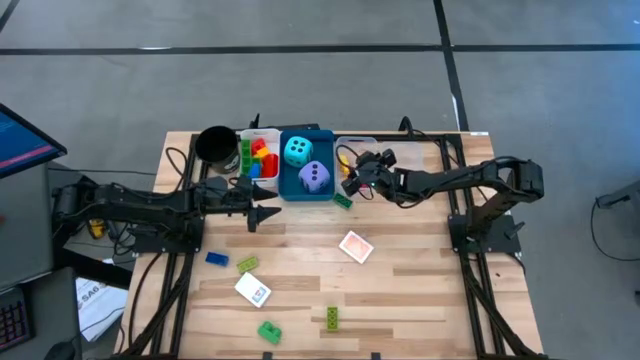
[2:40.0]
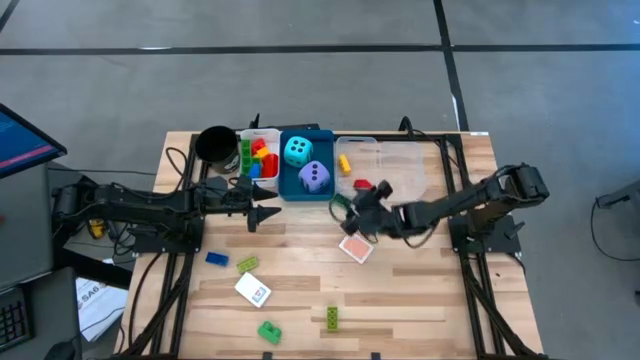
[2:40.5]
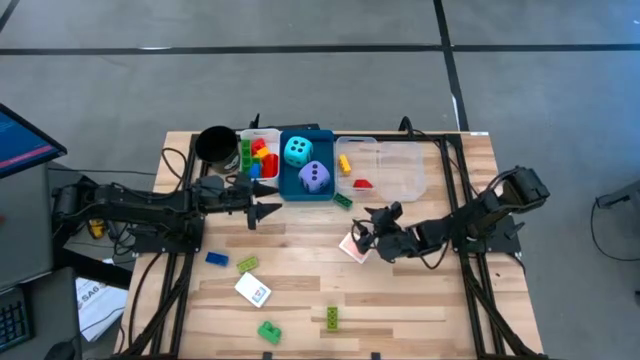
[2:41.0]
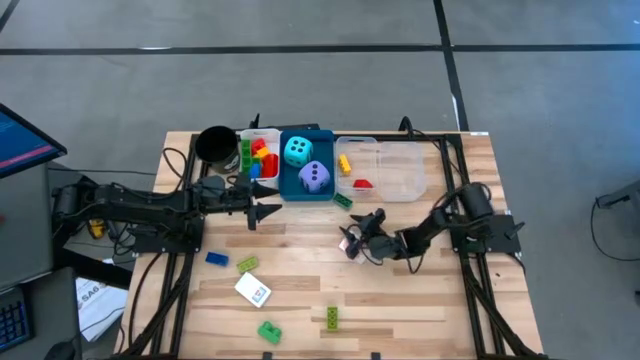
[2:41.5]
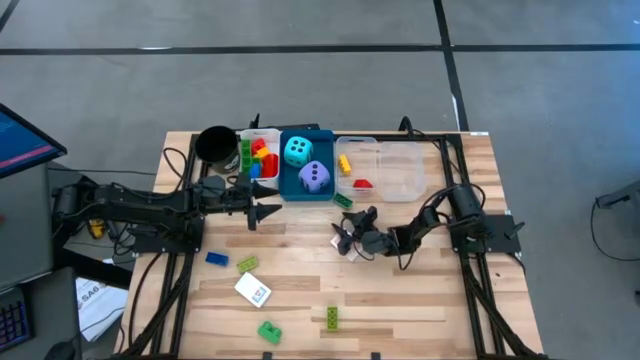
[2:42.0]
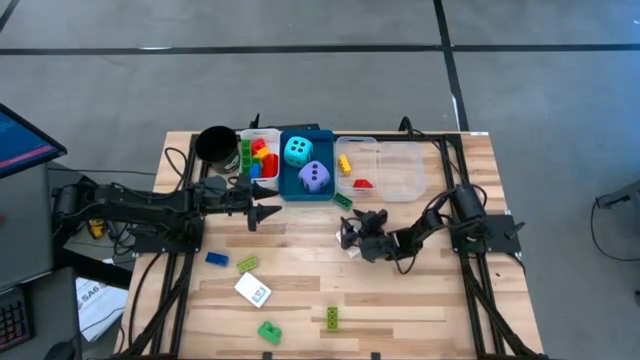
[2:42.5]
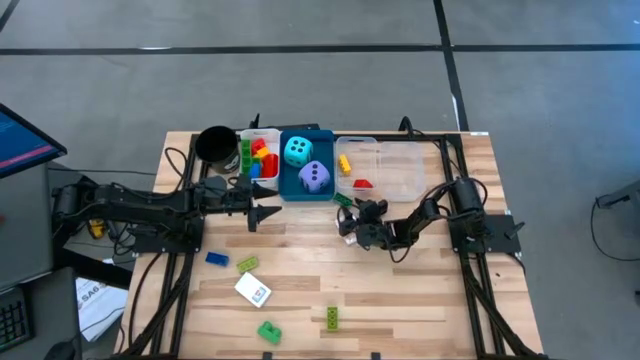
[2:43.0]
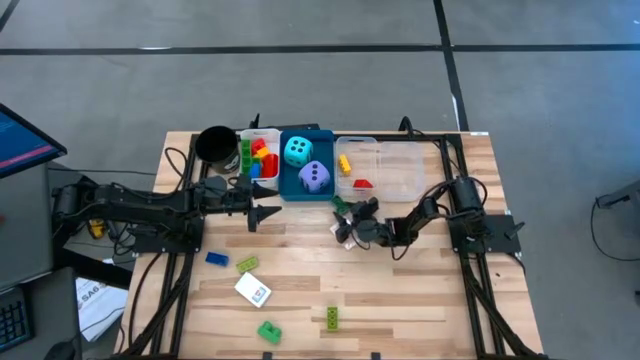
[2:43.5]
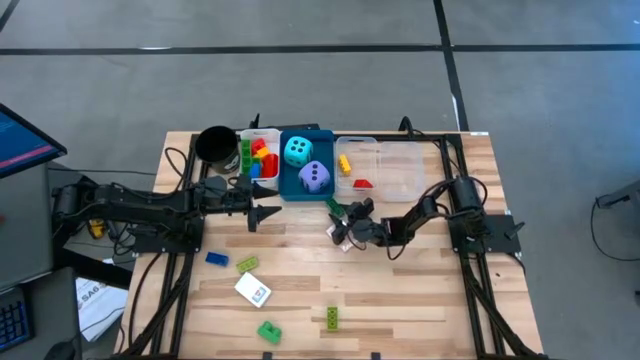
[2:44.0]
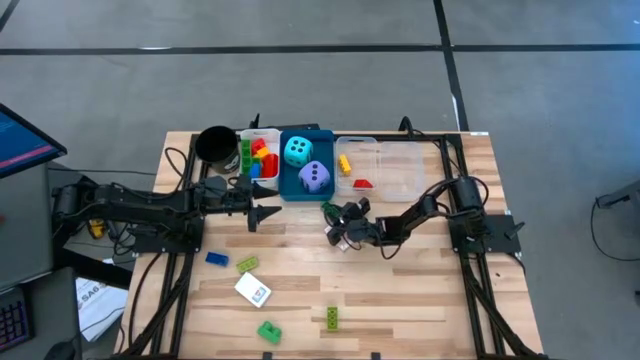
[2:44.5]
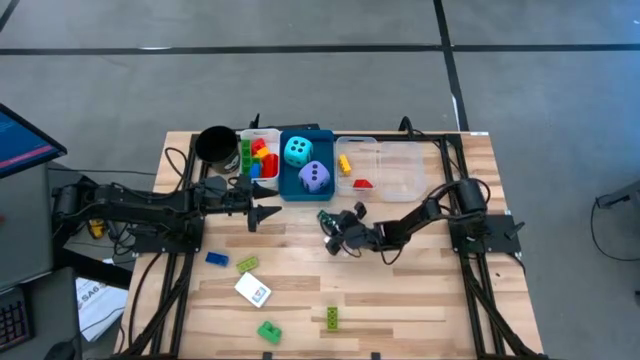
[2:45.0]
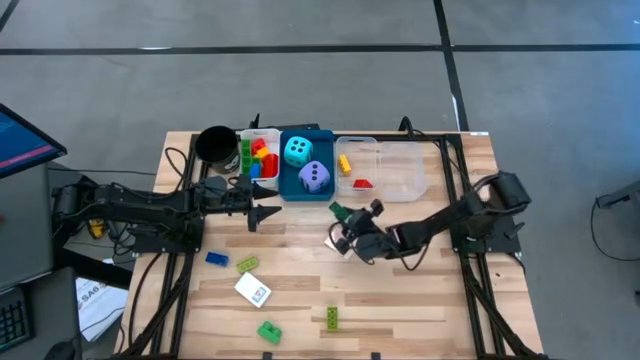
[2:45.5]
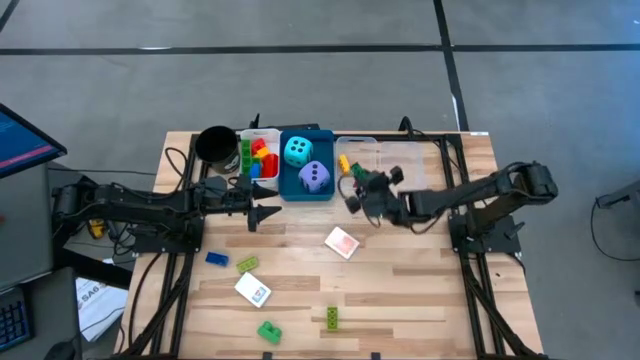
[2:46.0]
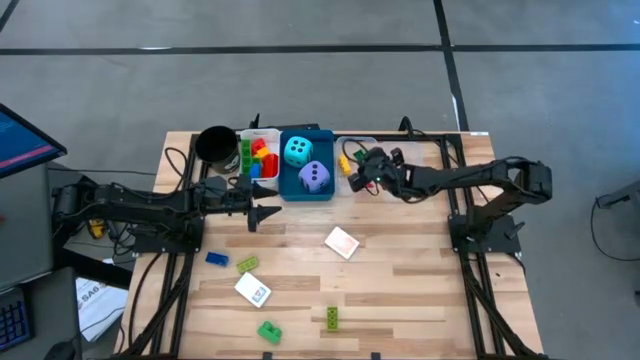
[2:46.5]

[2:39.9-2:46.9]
Task: Pick & Place Toys
Put the small dark green game piece into the left transparent bin

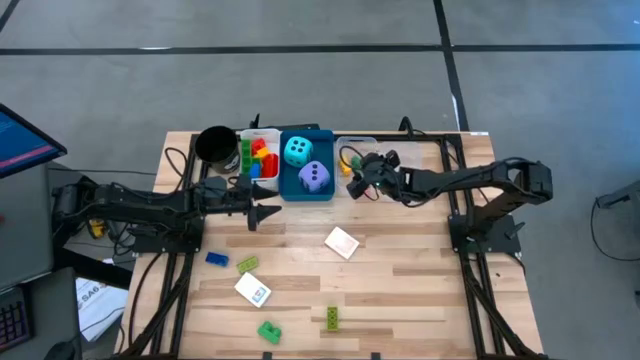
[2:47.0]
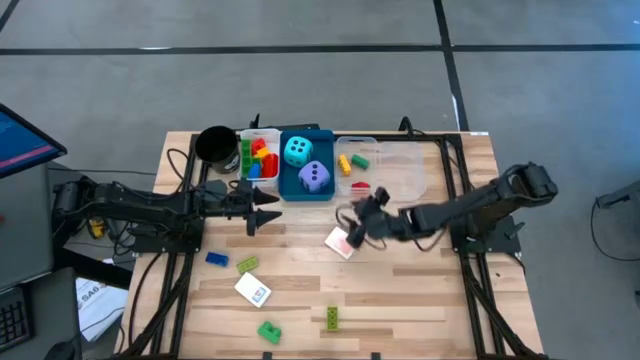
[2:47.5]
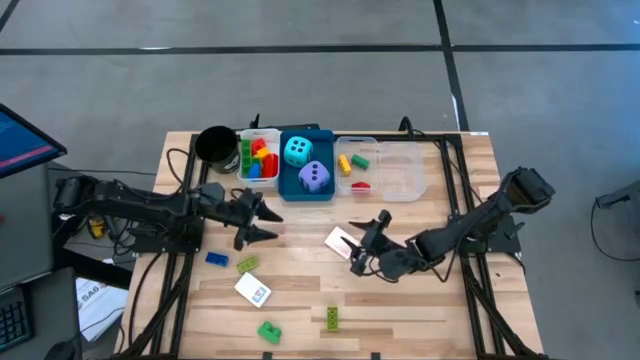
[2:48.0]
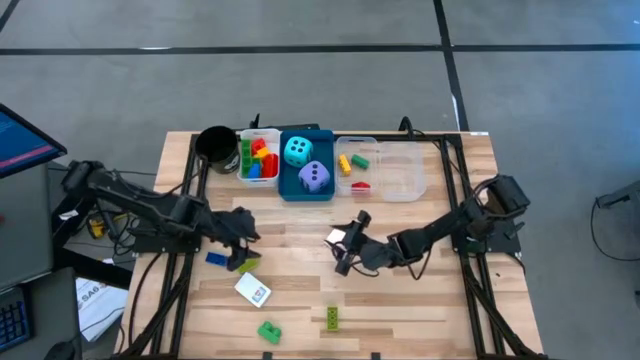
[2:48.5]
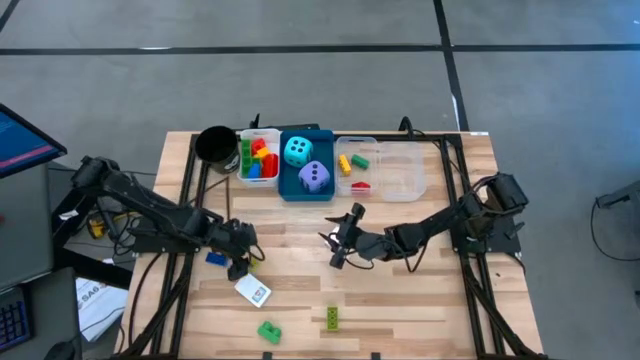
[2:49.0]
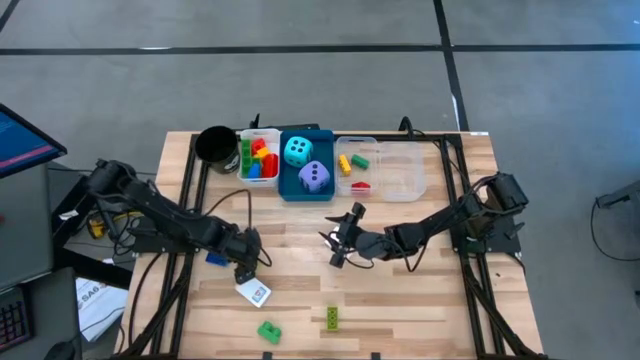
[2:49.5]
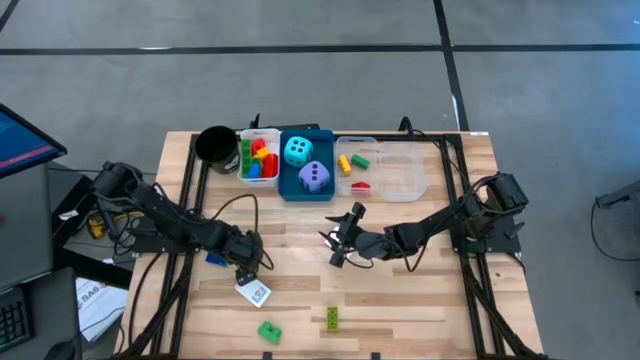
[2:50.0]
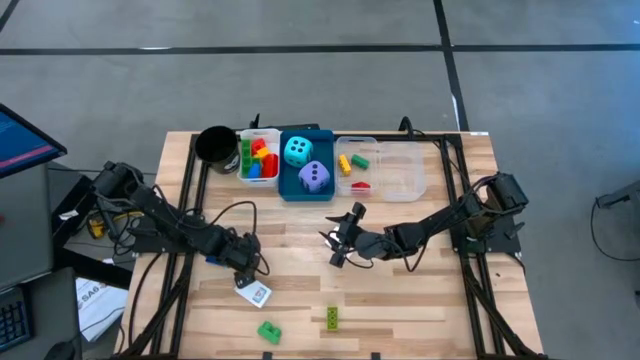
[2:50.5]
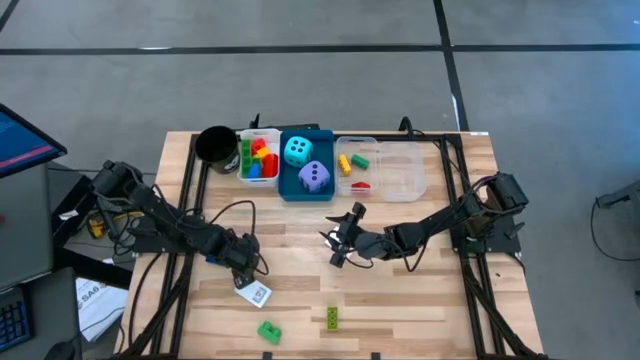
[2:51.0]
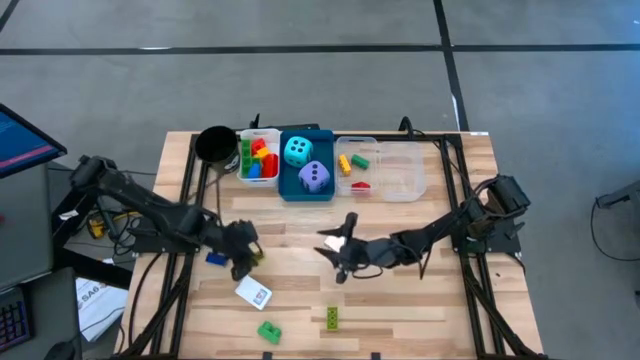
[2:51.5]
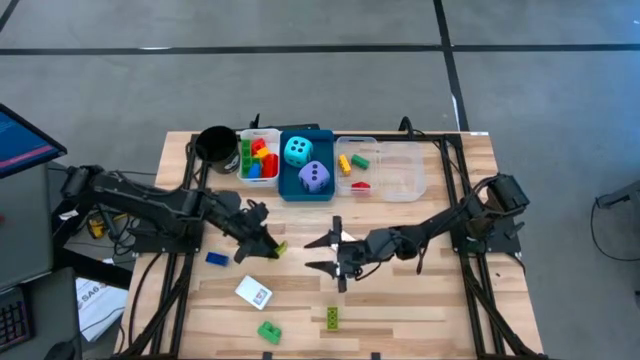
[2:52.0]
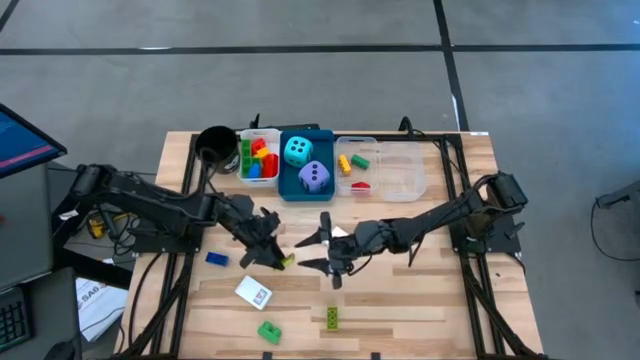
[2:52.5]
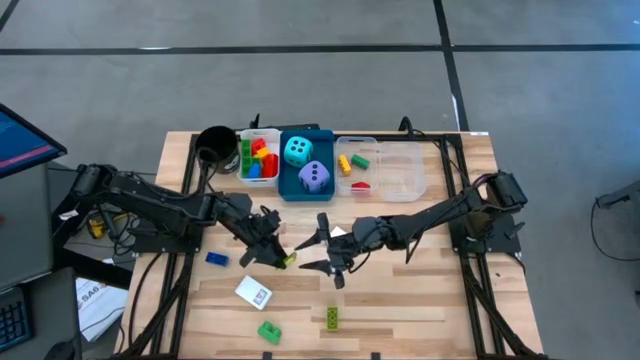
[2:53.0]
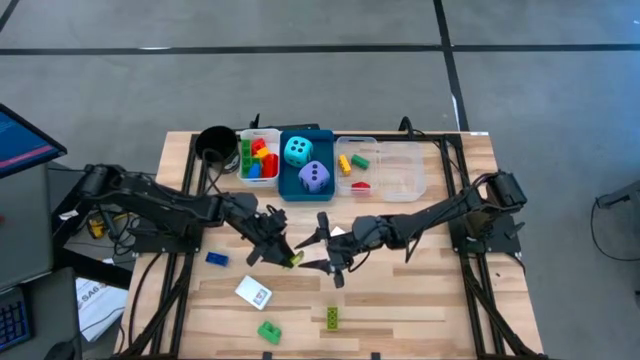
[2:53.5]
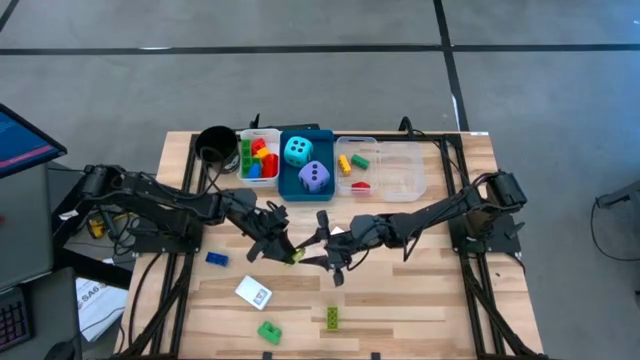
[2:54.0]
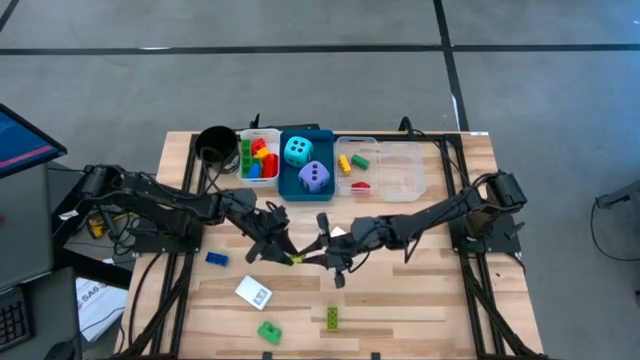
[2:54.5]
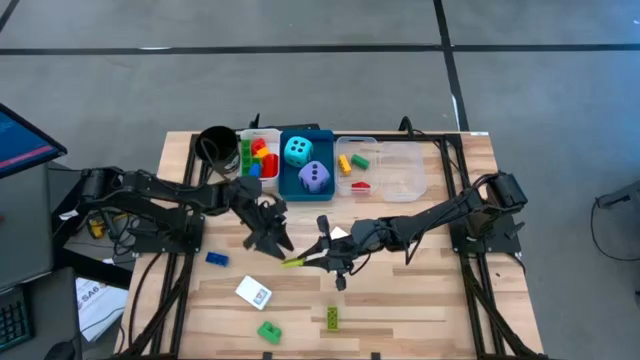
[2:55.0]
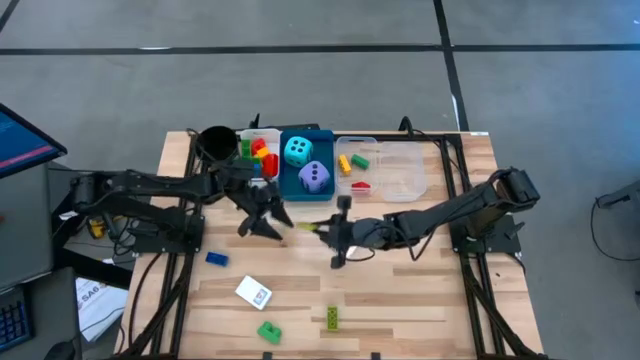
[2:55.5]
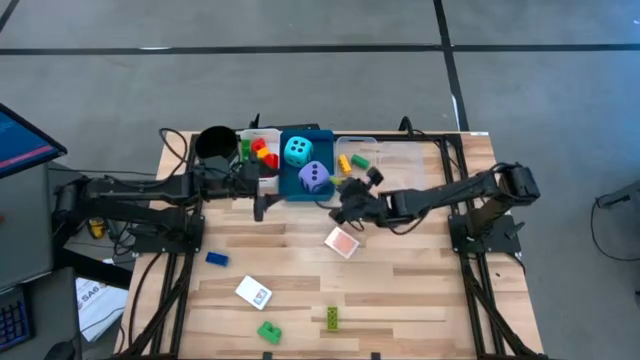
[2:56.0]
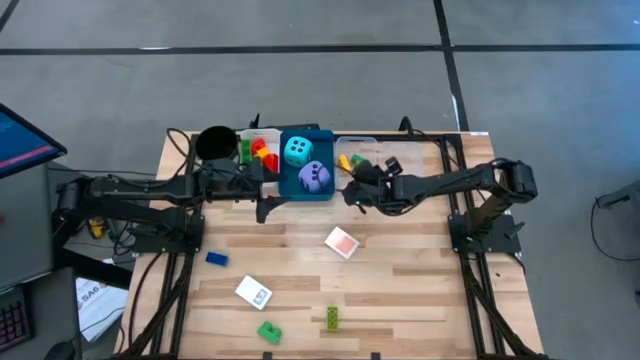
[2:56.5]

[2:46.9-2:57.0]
Put the left green game piece into the left transparent bin

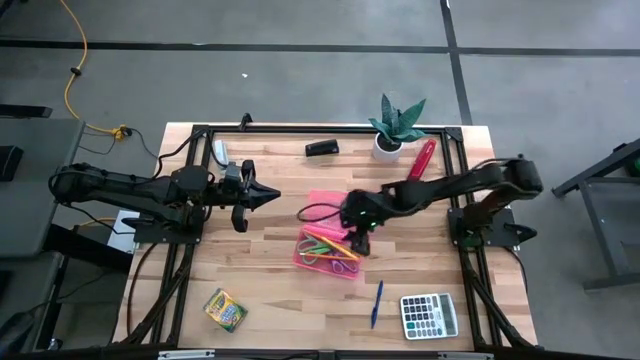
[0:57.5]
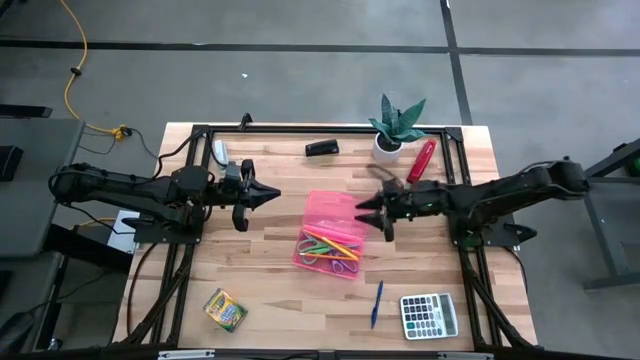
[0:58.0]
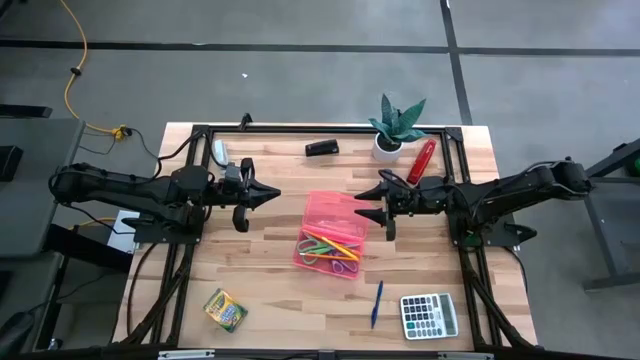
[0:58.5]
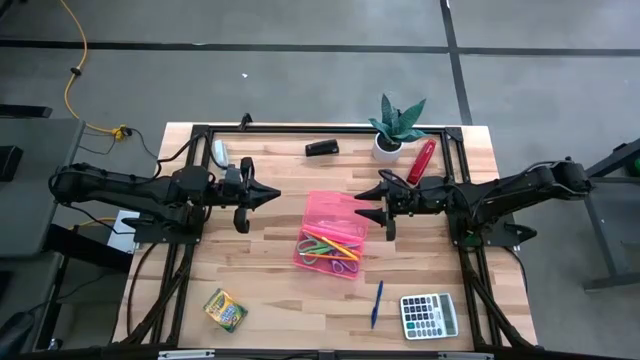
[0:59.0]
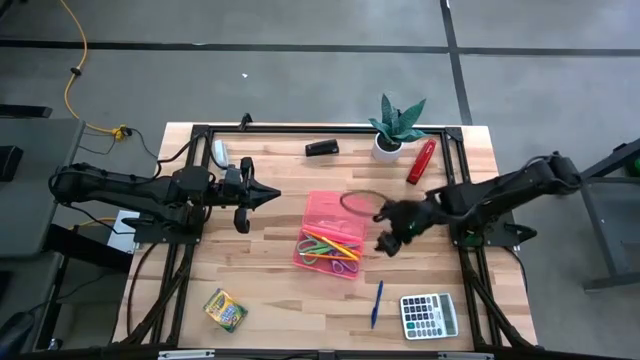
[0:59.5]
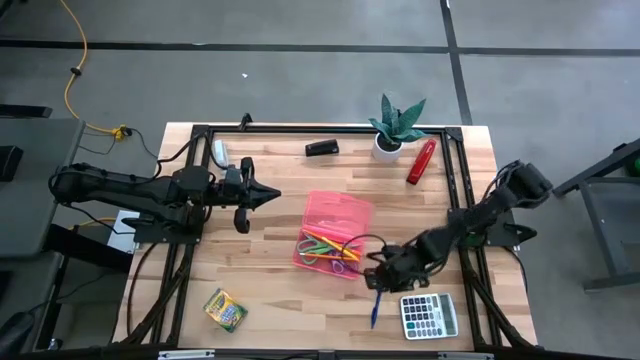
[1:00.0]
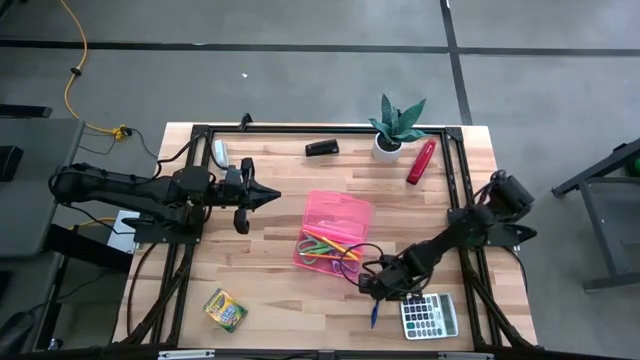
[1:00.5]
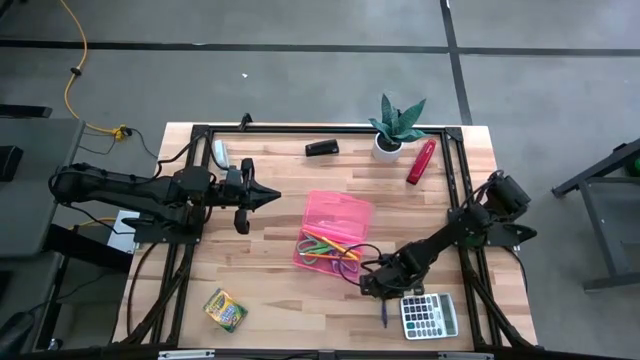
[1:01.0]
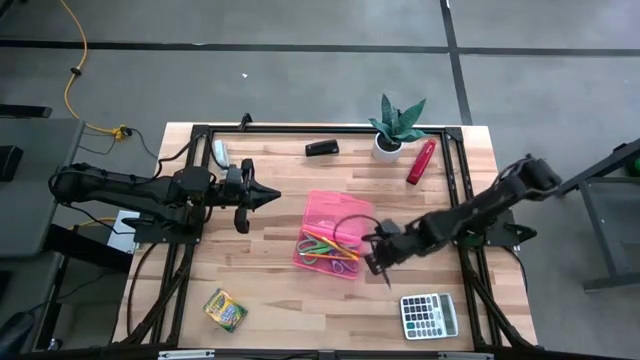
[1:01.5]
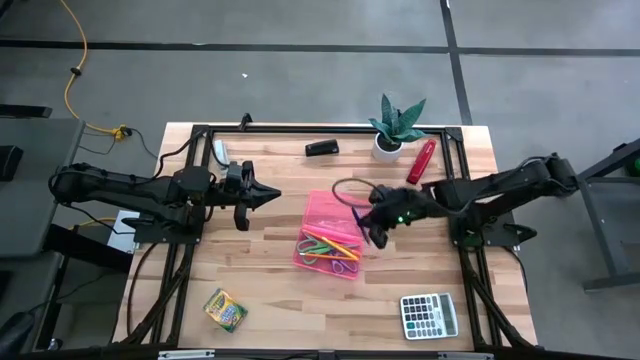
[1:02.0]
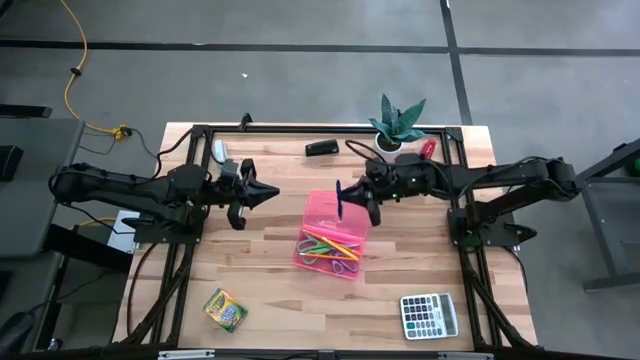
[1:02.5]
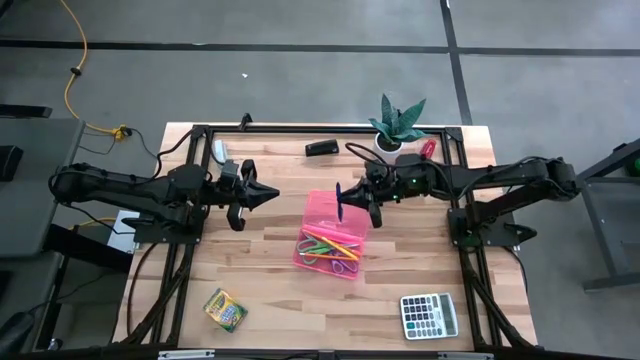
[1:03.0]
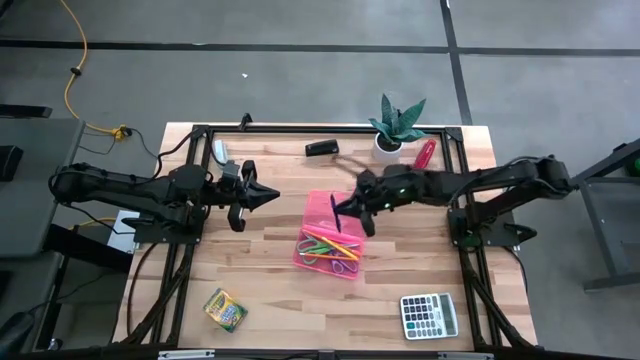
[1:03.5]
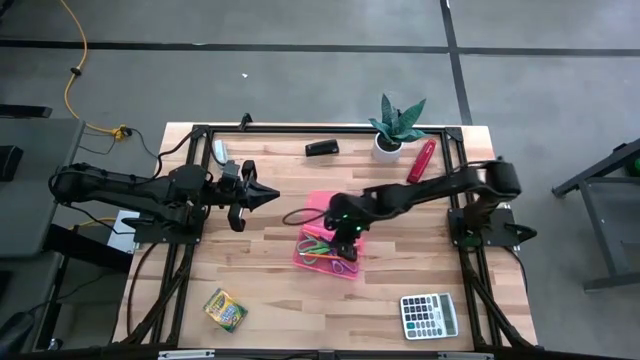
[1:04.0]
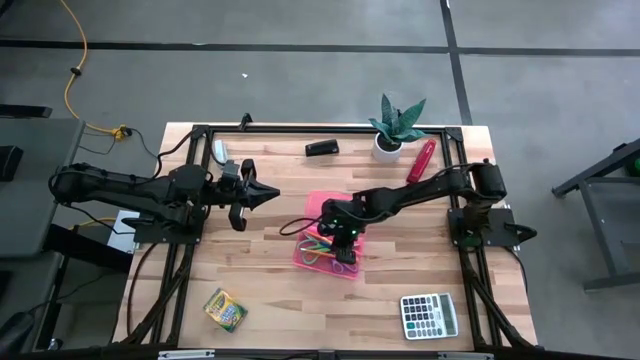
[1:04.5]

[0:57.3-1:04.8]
Task: Pick & place school supplies into a supply box
Put the blue pen into the pink supply box
